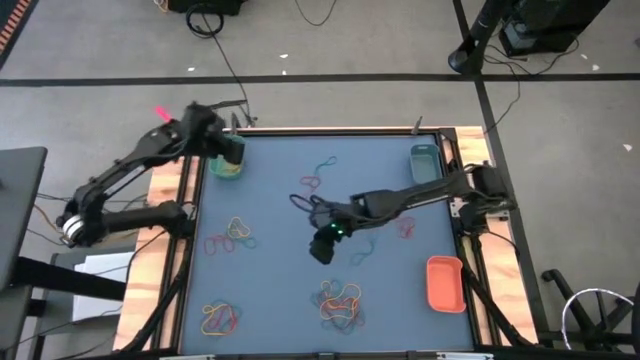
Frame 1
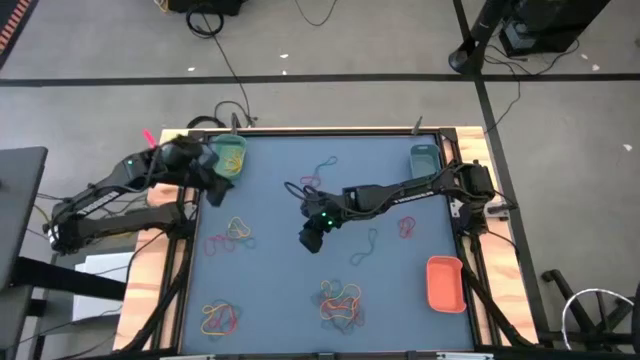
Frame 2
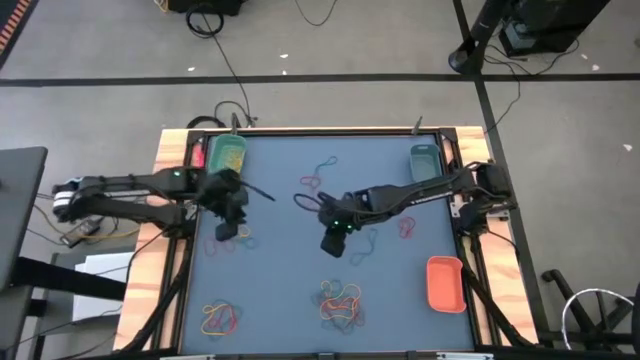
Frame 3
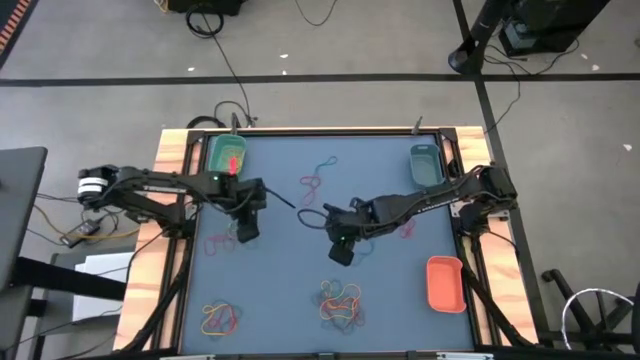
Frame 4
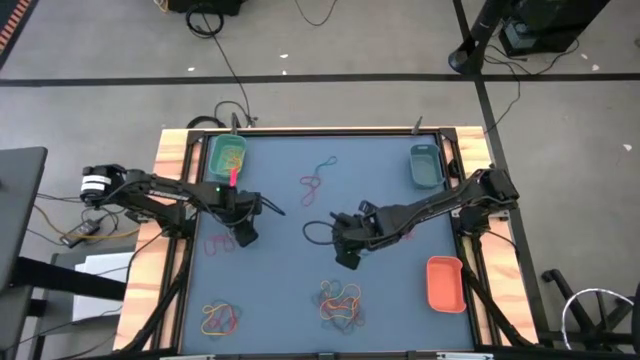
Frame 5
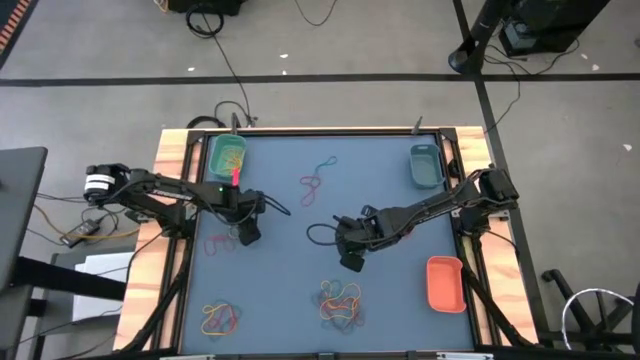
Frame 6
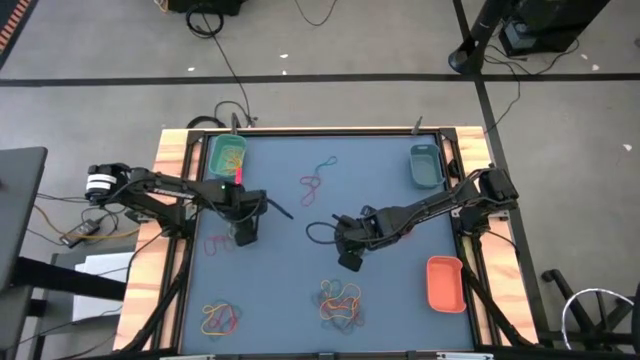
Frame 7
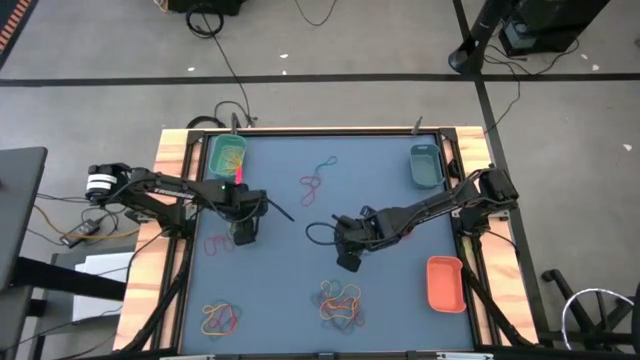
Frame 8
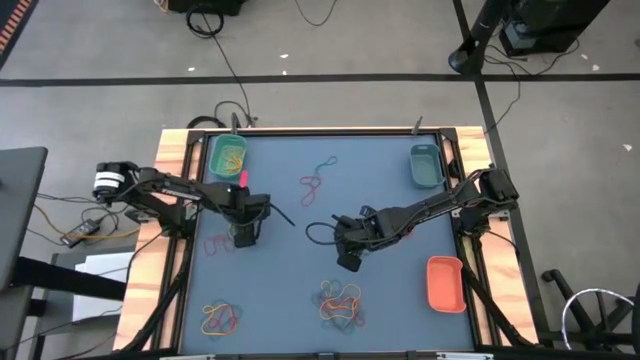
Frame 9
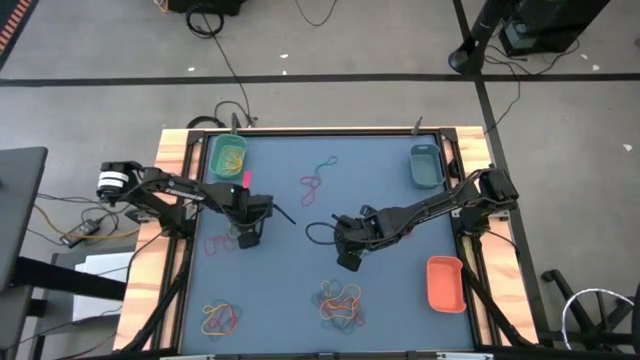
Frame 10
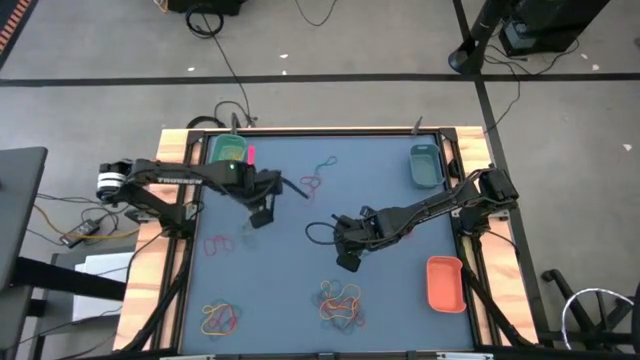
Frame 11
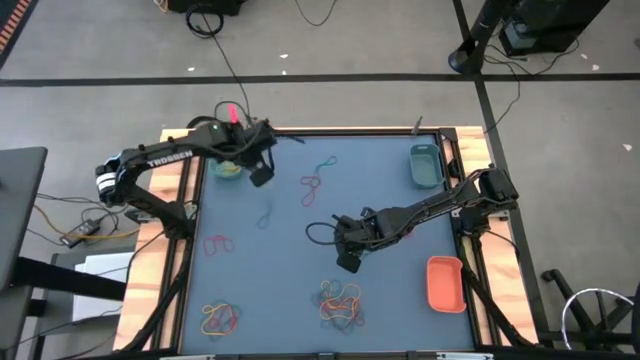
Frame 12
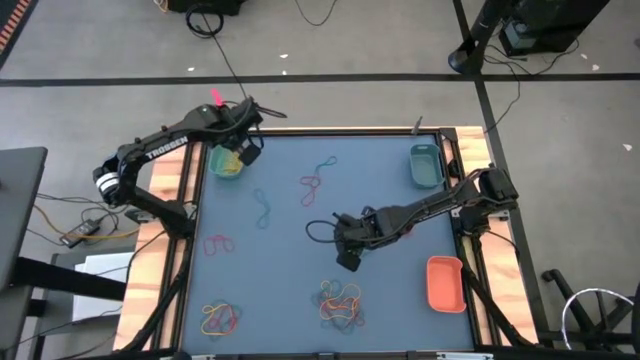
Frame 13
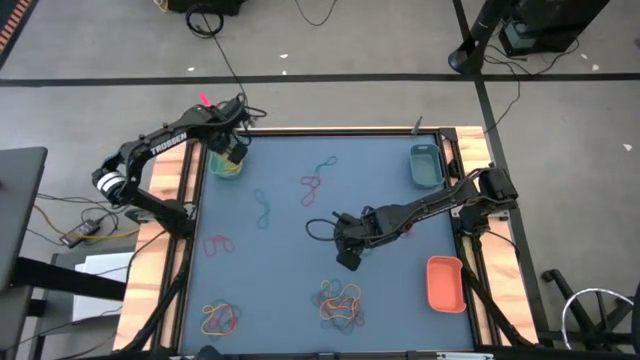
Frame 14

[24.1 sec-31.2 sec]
Task: Sort rubber bands into baskets
Put the yellow rubber band into the green bin

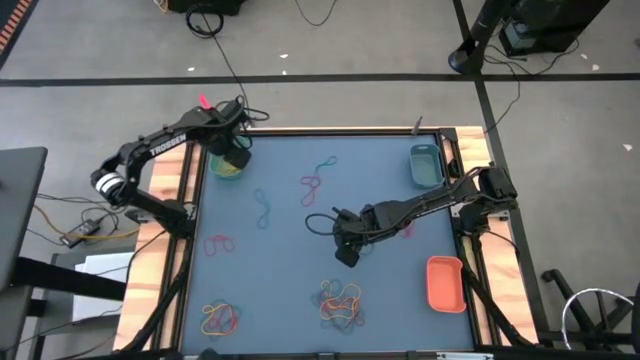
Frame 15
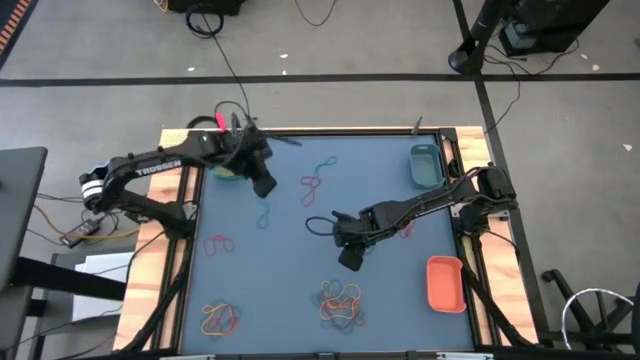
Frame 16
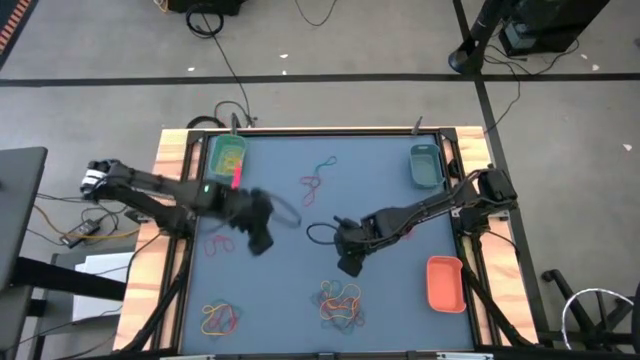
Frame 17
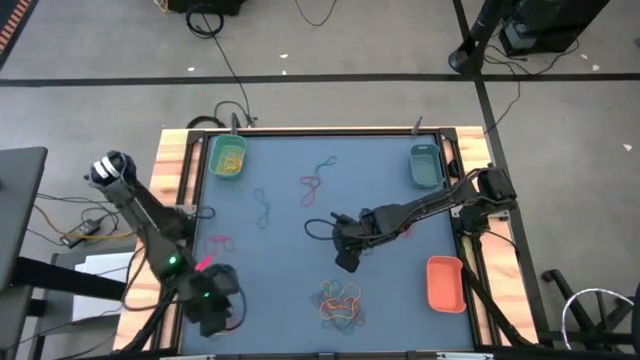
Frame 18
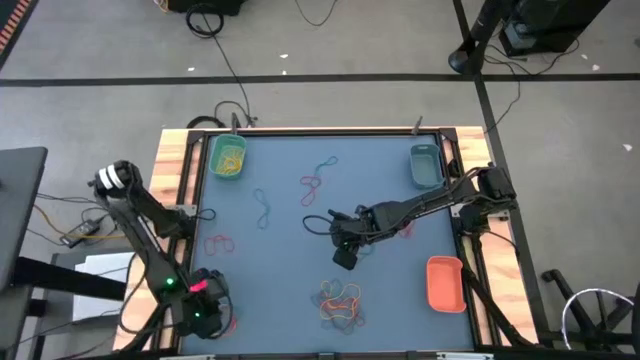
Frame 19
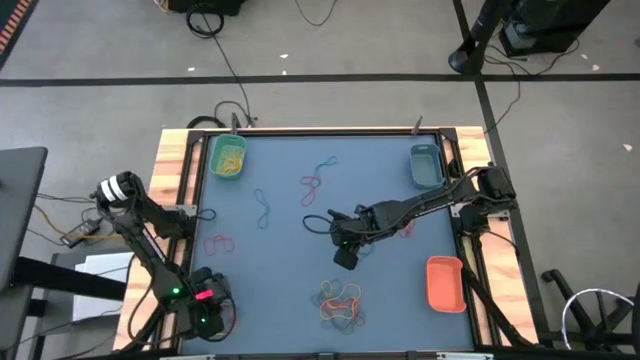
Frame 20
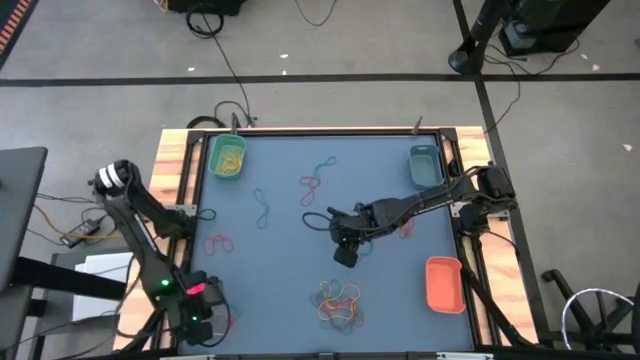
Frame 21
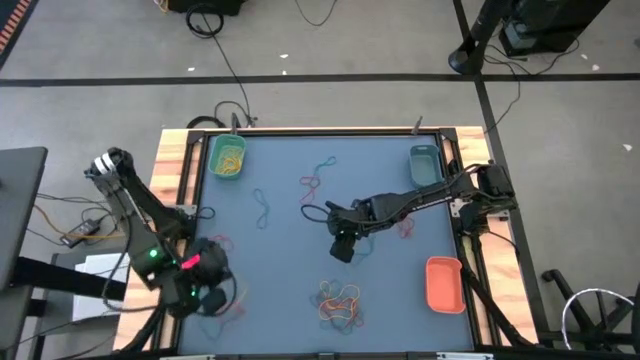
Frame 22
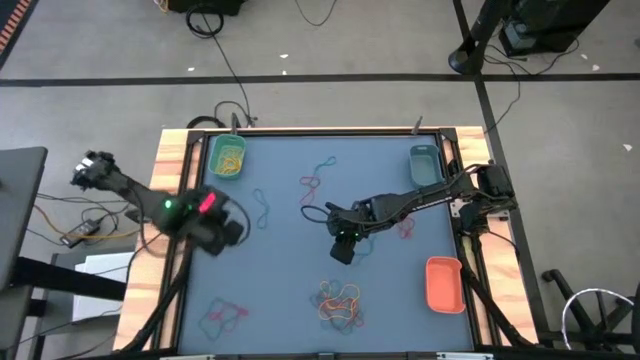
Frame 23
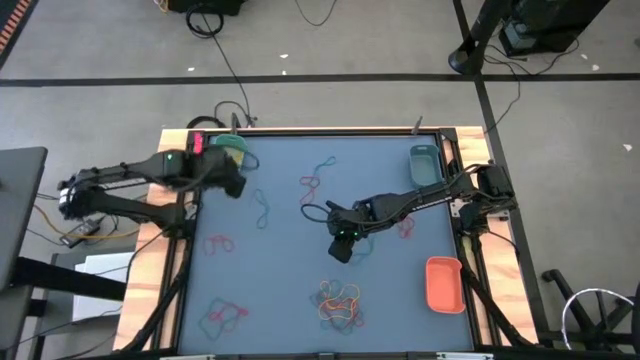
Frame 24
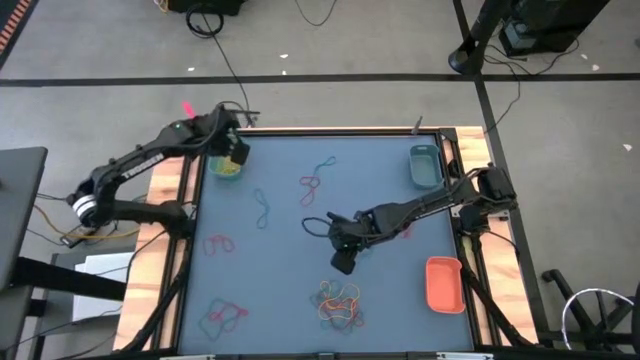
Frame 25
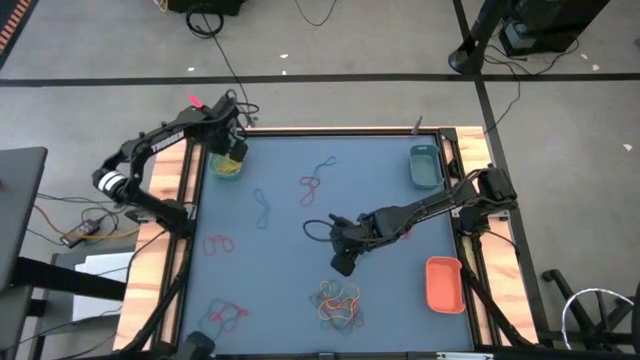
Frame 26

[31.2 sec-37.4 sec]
Put the yellow rubber band into the green bin

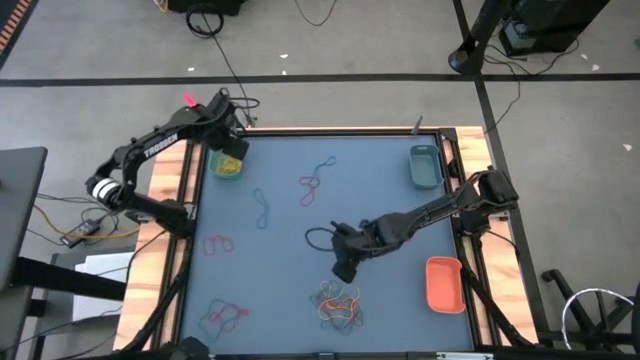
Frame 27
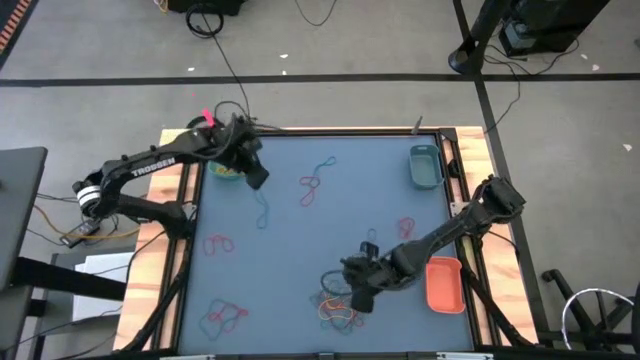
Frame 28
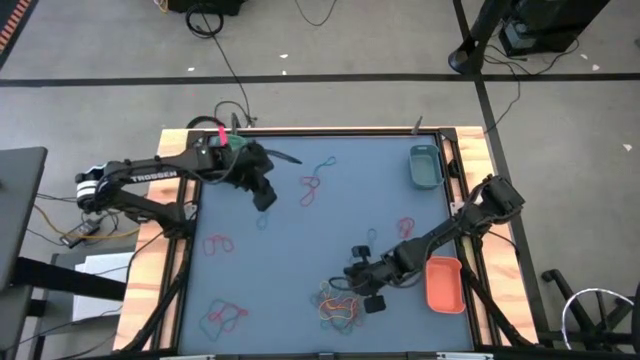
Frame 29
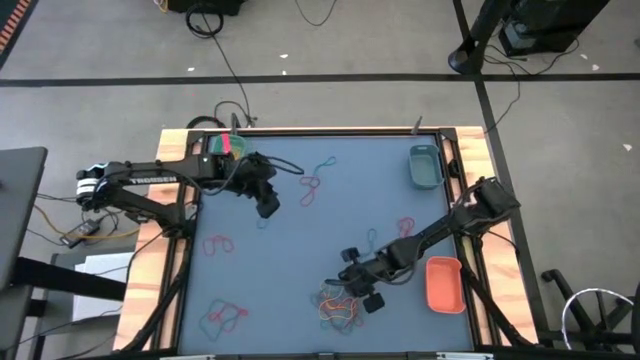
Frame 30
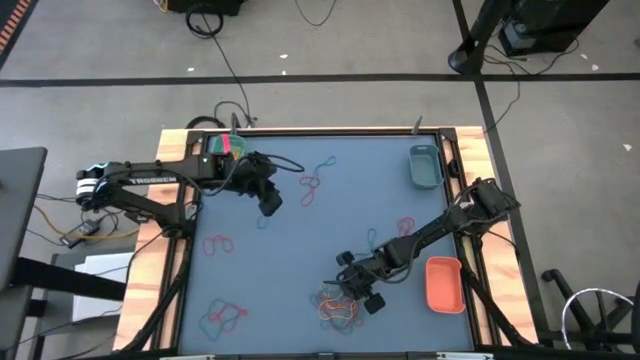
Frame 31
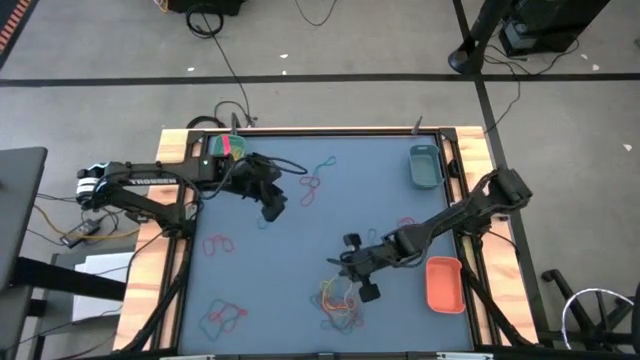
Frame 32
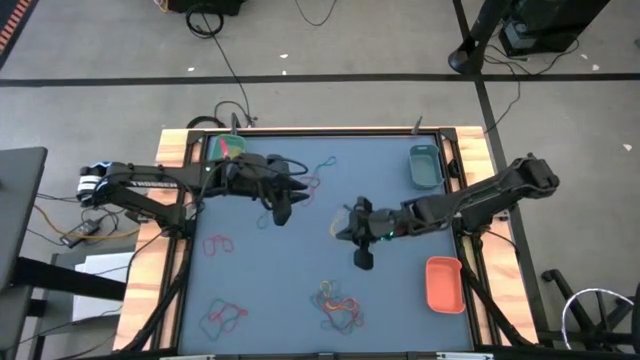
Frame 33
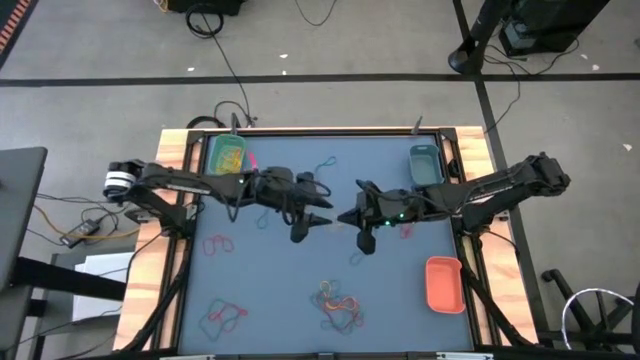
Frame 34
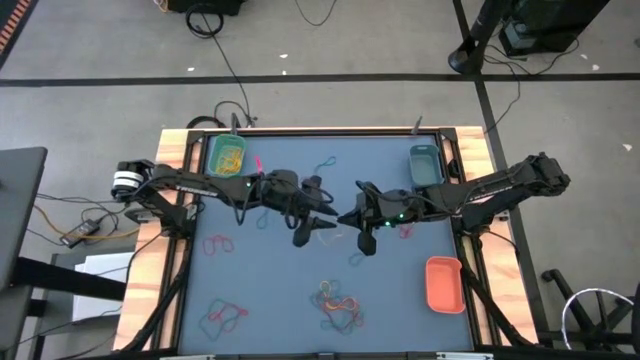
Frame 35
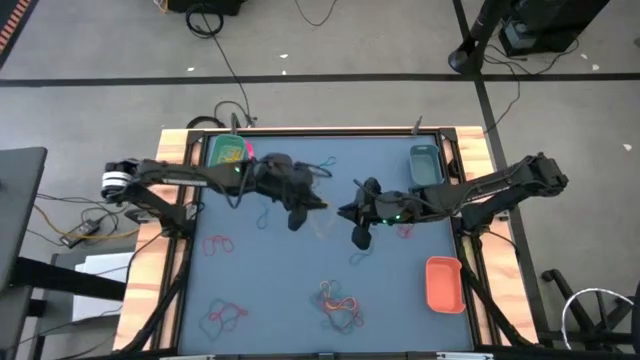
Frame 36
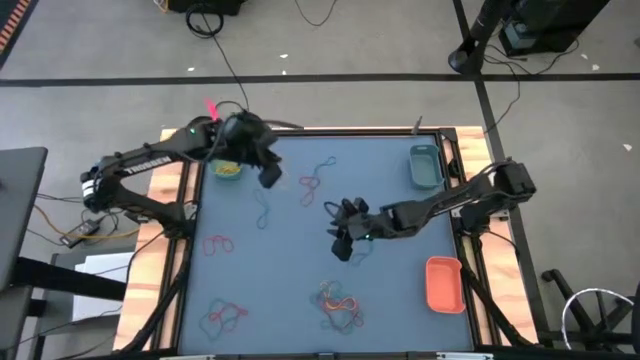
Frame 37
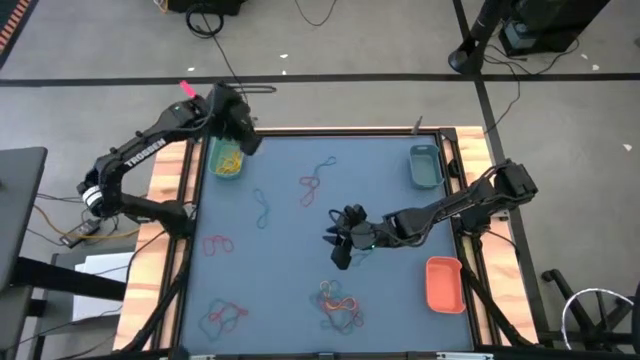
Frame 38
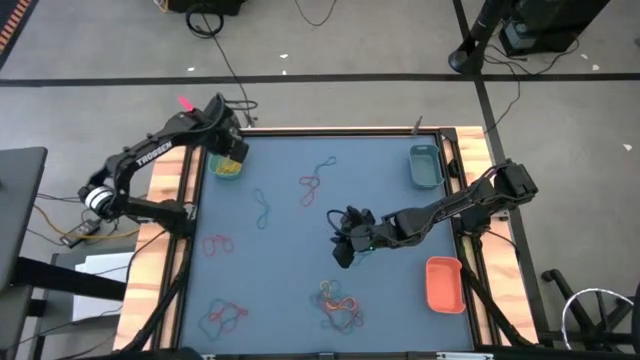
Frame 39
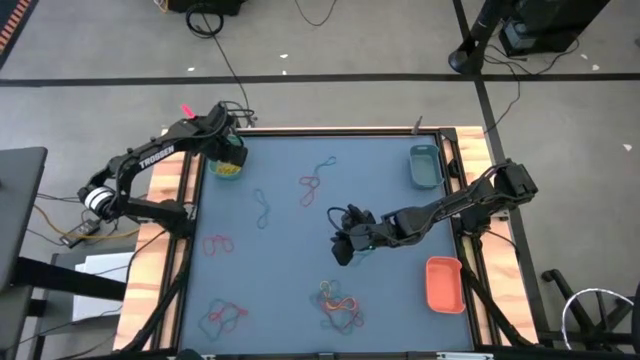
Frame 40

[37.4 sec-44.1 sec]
Put the yellow rubber band into the green bin

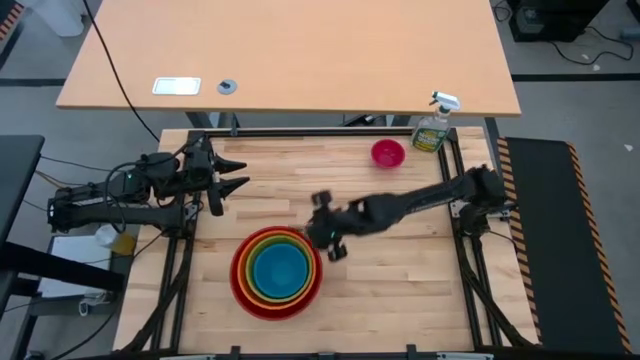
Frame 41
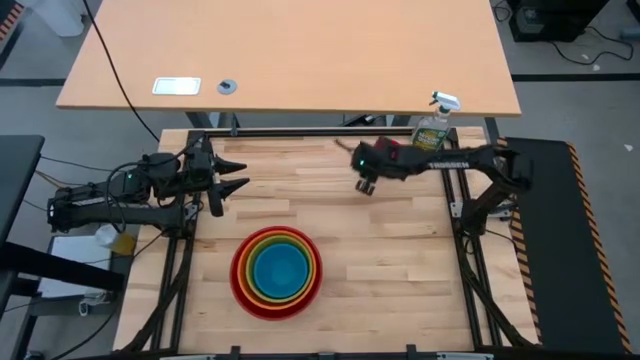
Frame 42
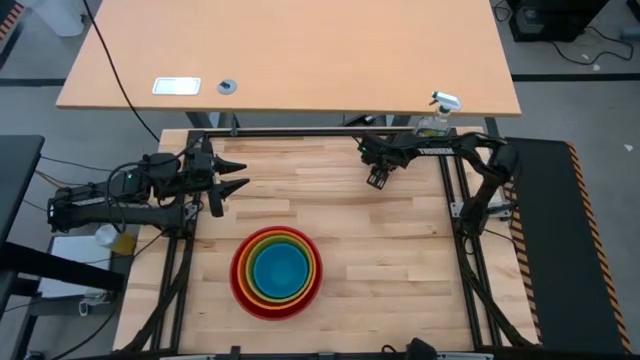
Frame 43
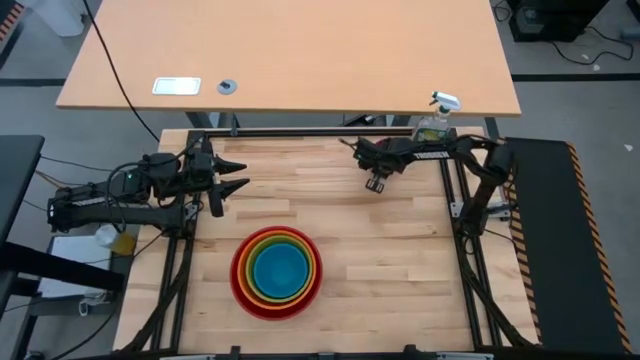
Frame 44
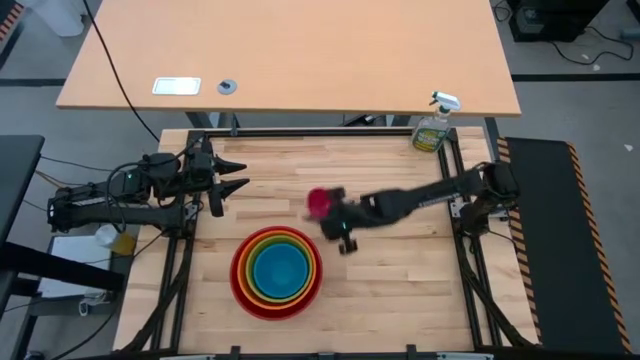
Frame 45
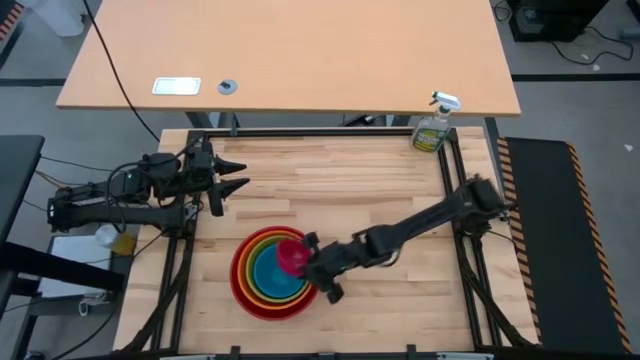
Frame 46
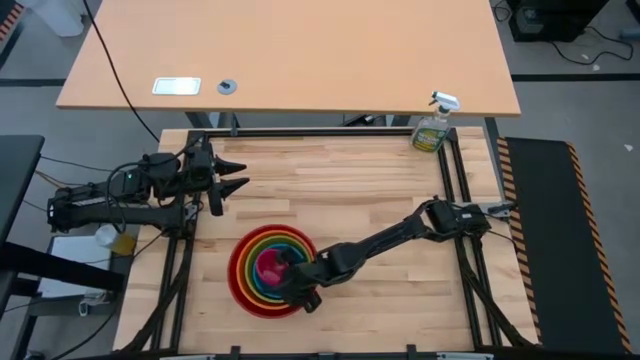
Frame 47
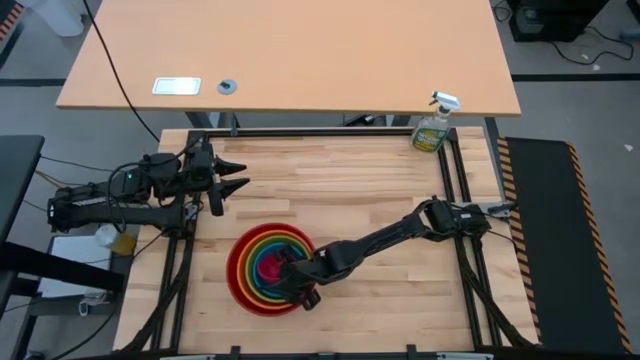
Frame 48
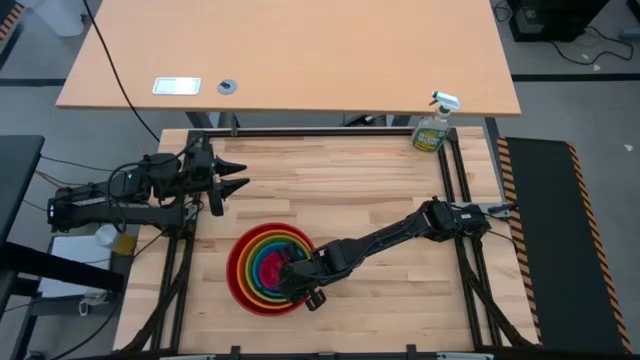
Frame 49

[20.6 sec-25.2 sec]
Task: Nest bowls inside each other by size order
Stack the pink bowl on top of the blue bowl
